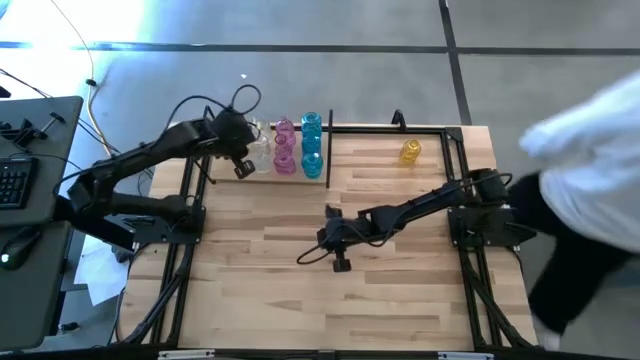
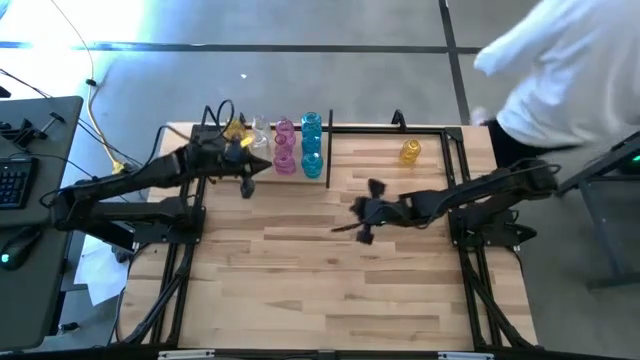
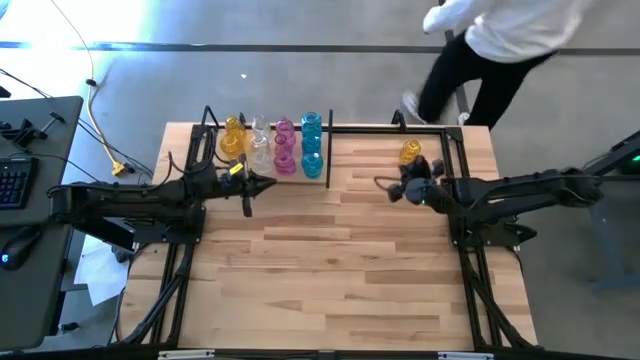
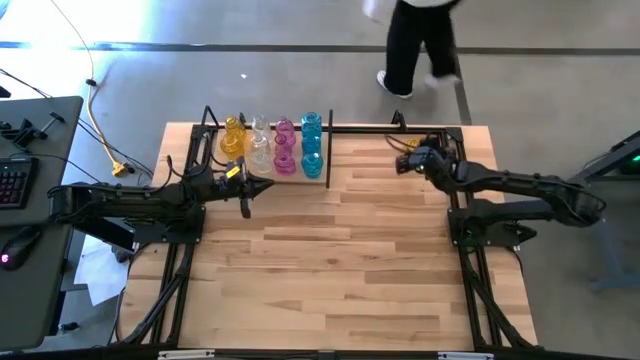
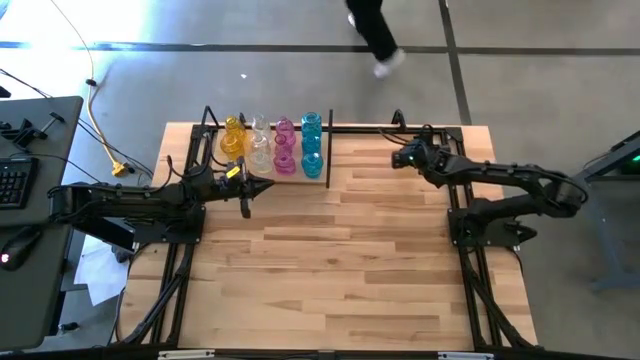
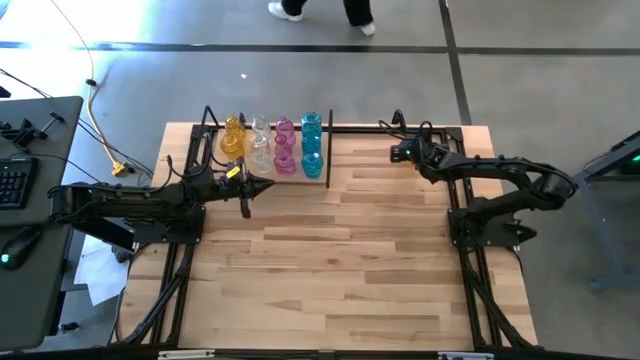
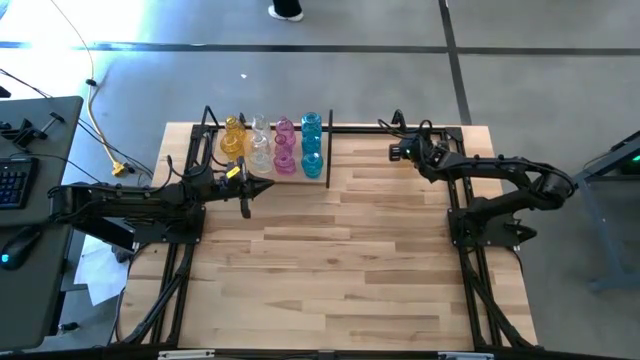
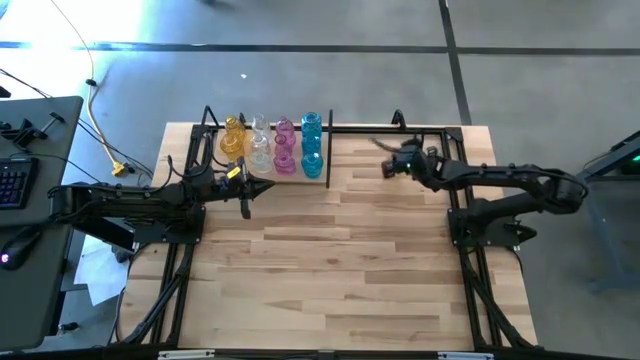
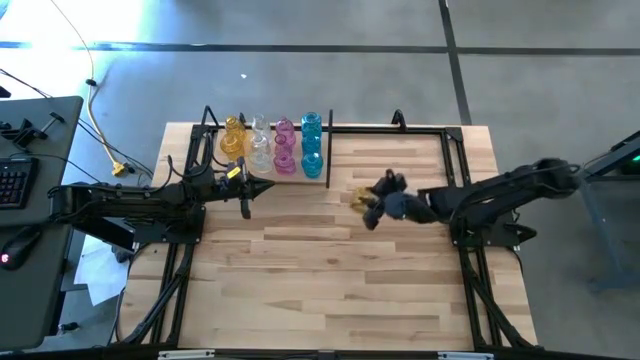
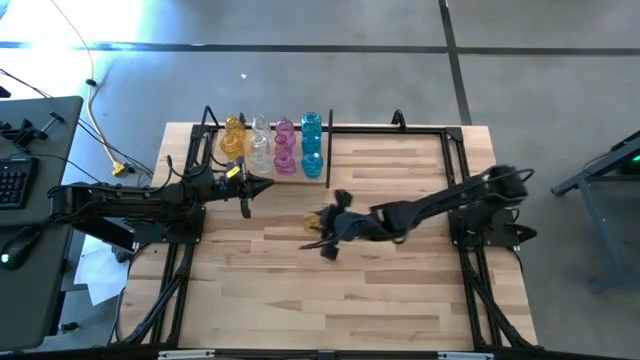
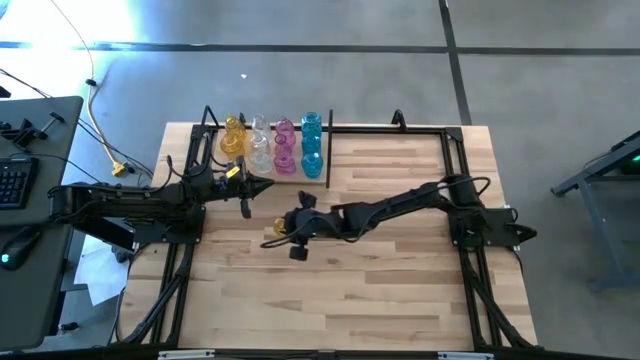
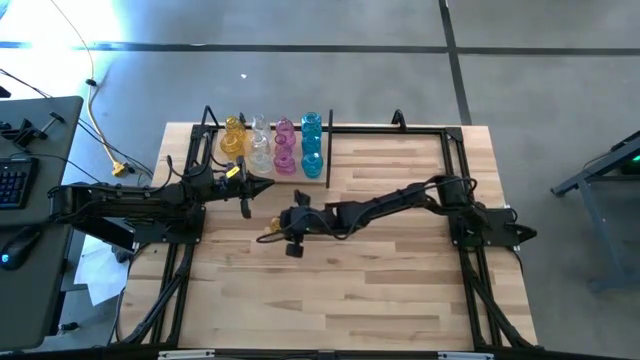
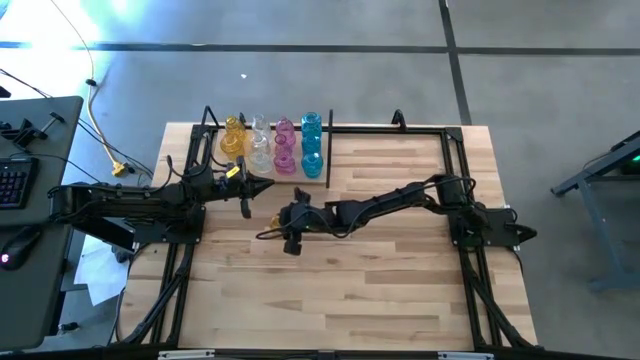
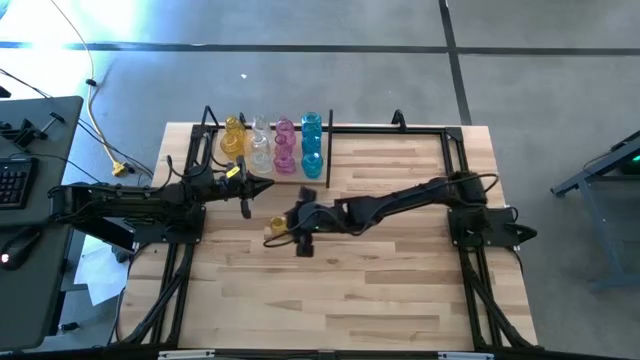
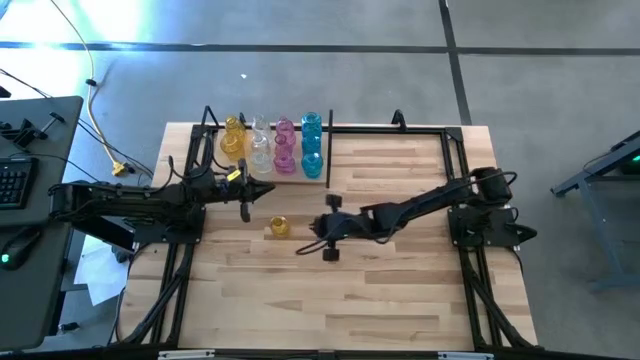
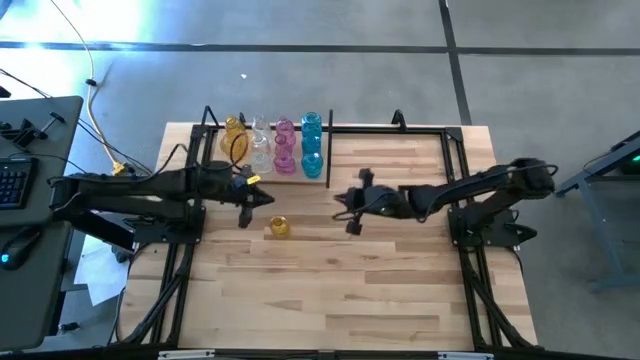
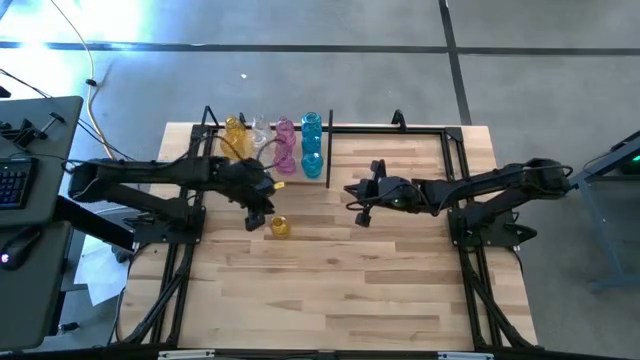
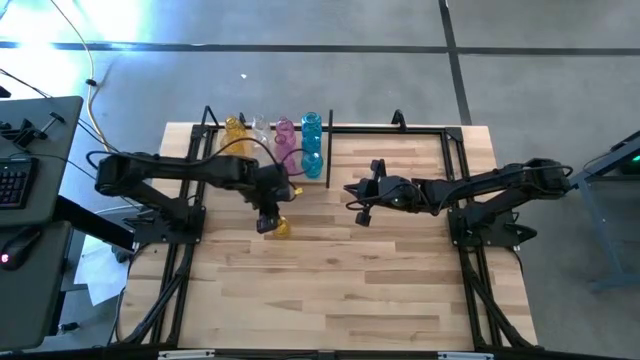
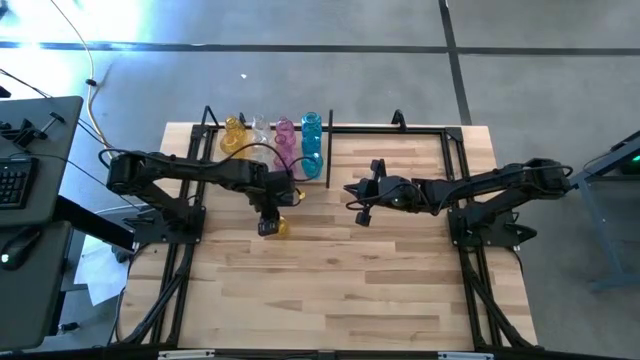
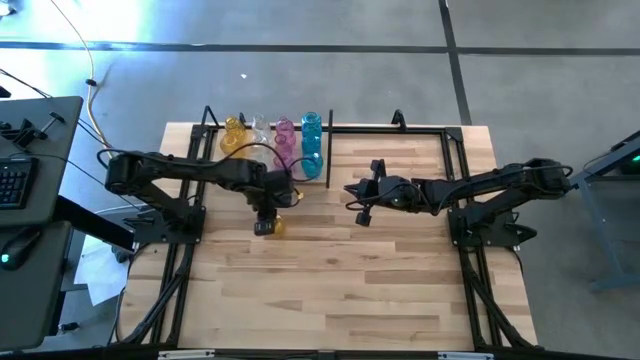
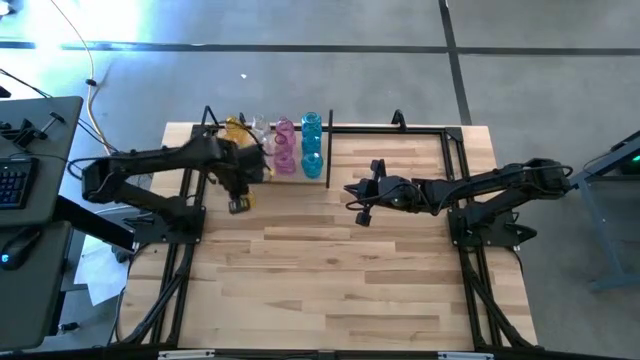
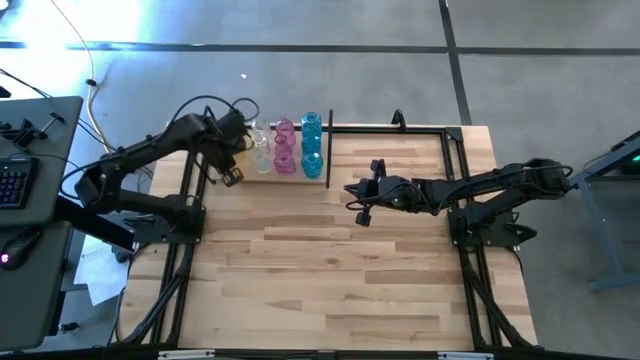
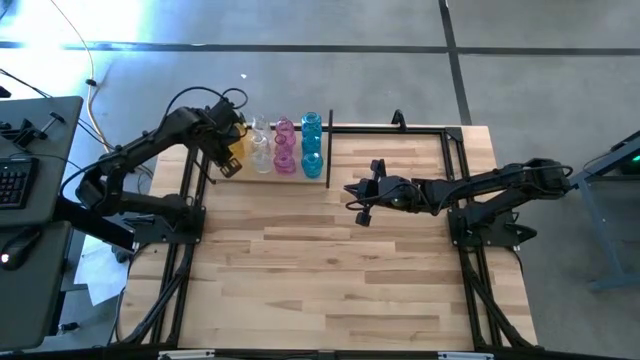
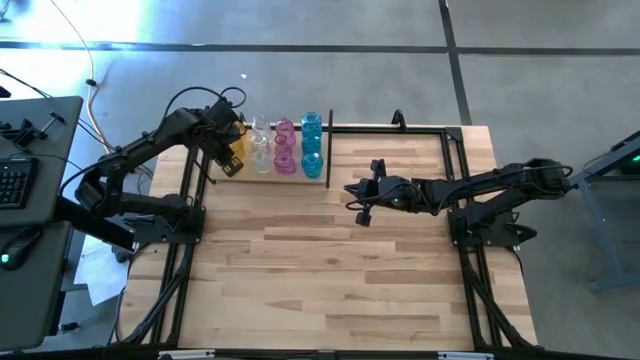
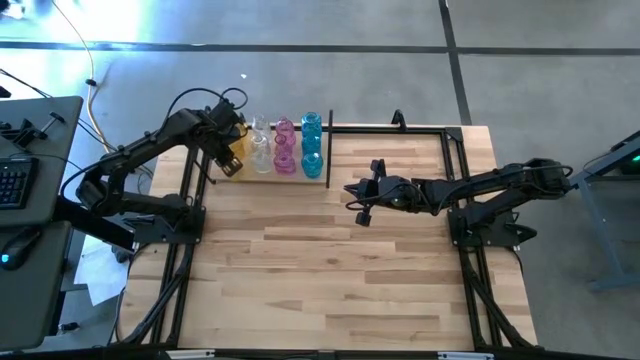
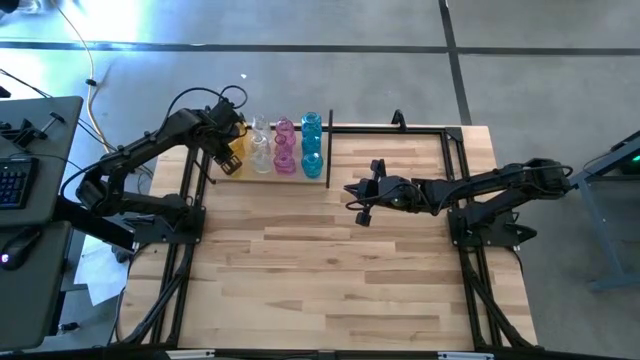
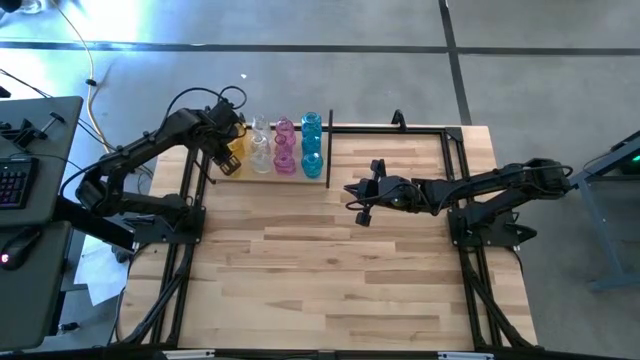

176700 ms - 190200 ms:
Task: sort vases onto shelf
Put the yellow flower vase aligned with the other yellow flower vase on the shelf

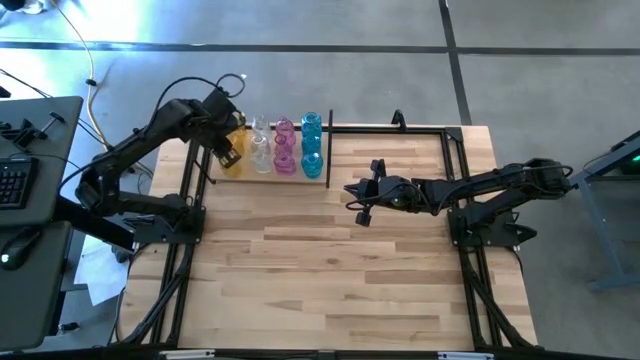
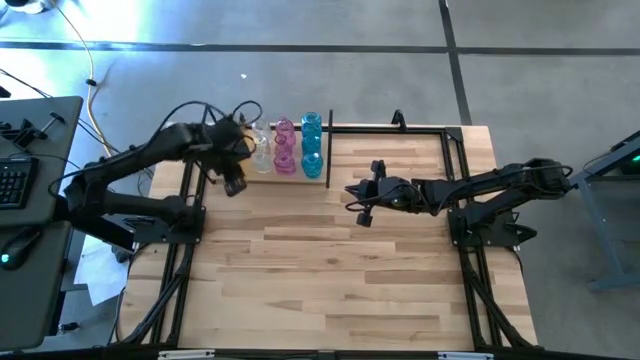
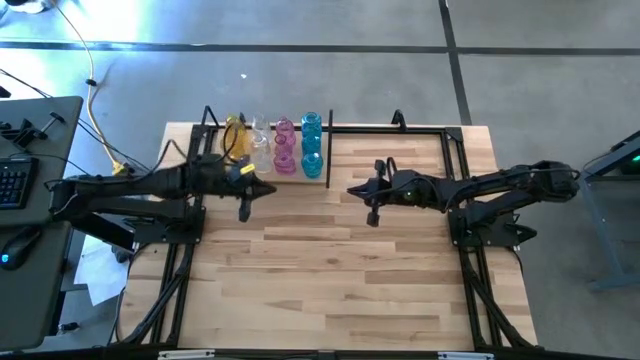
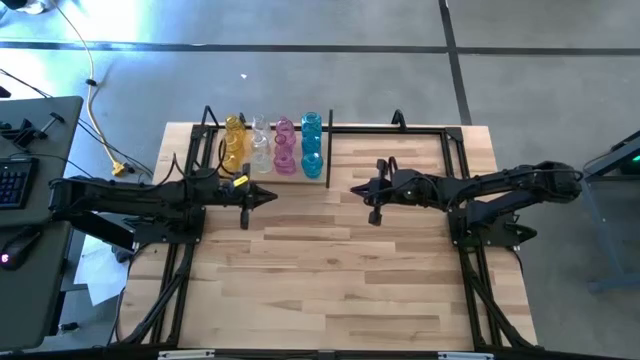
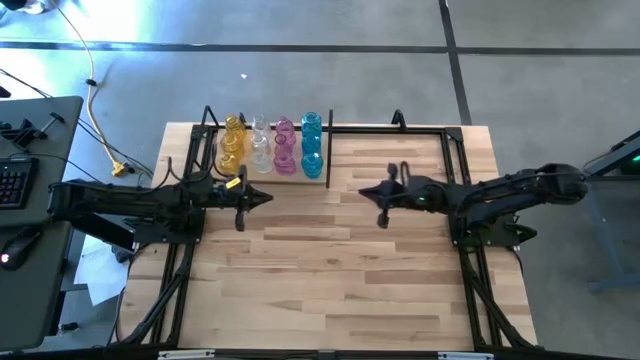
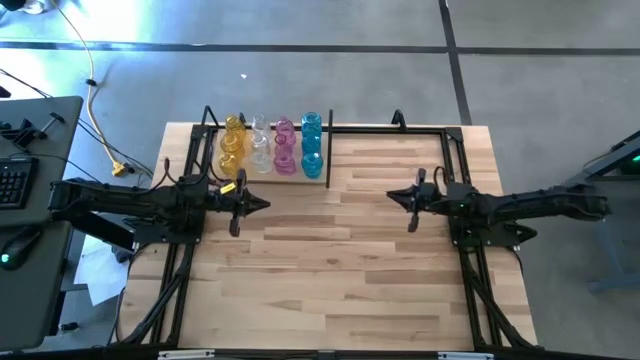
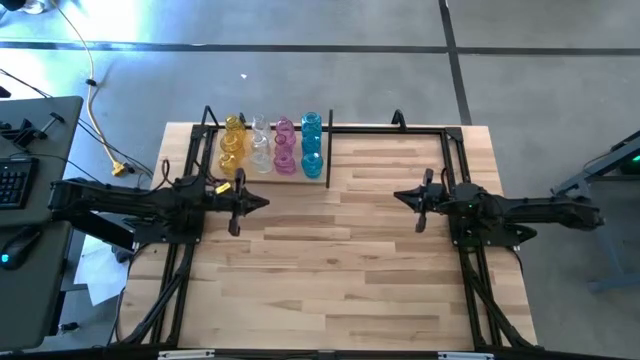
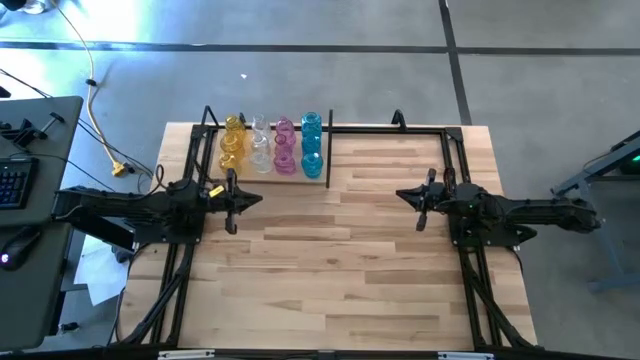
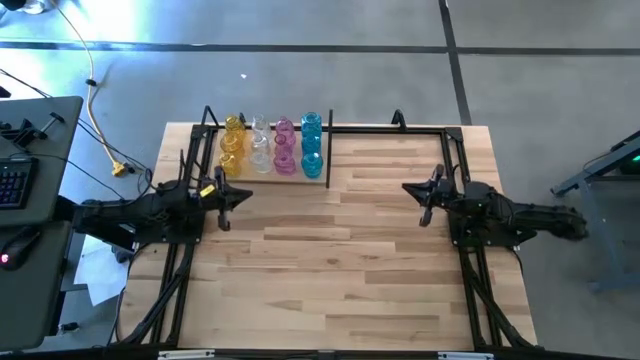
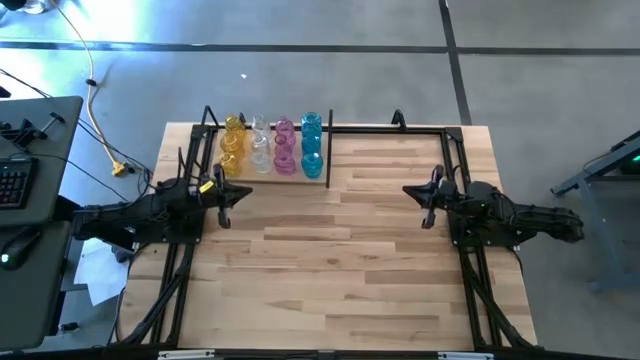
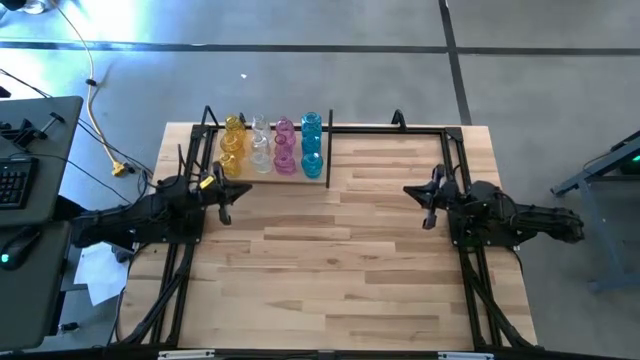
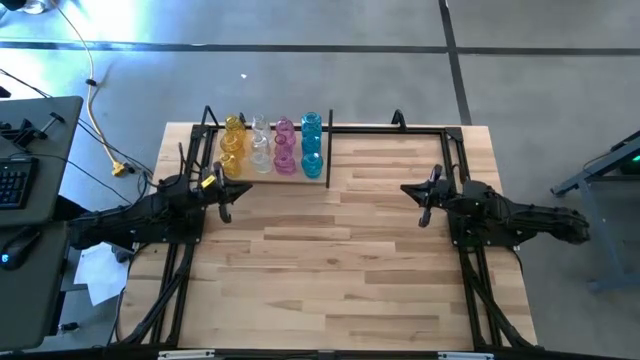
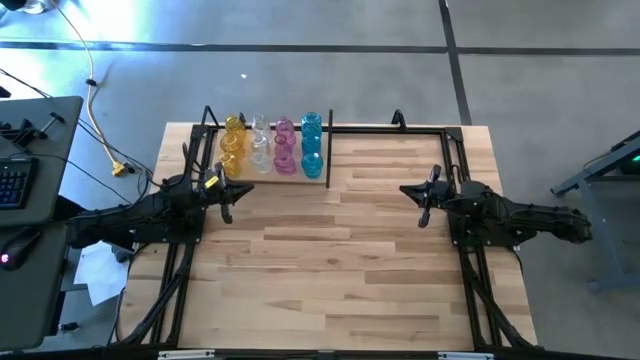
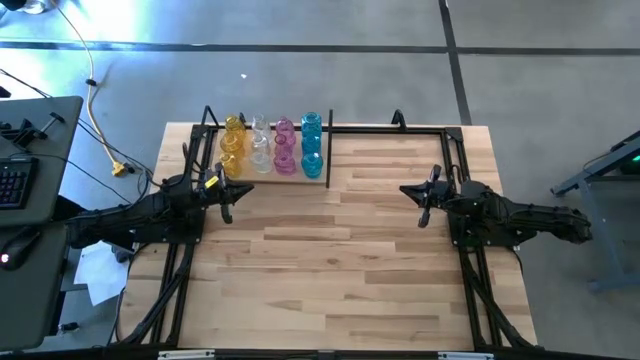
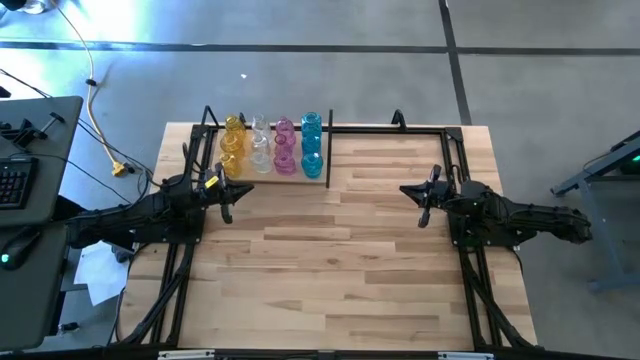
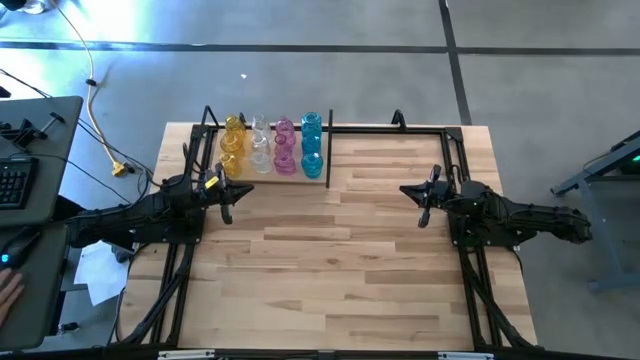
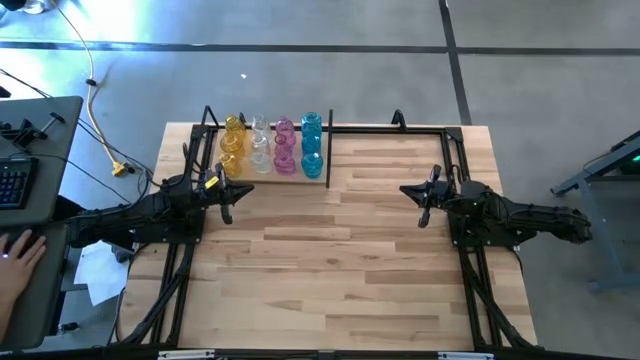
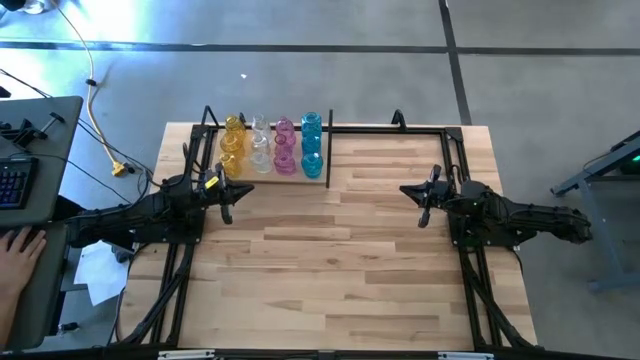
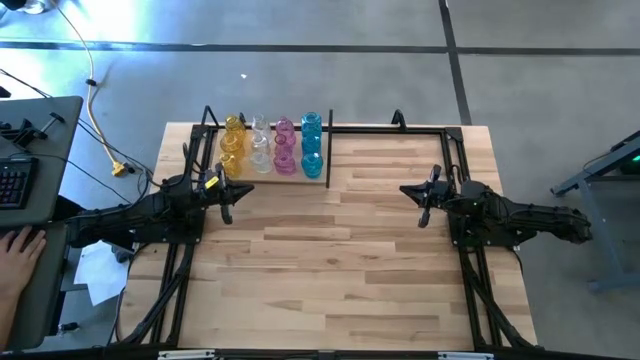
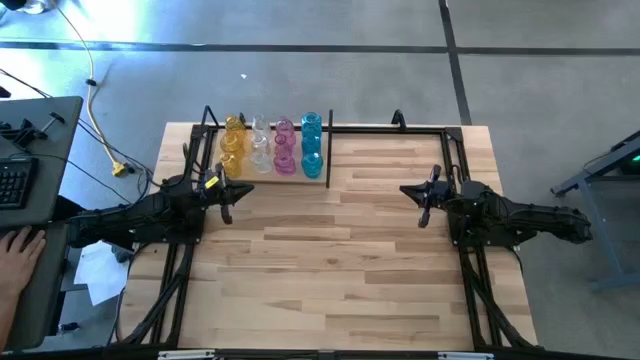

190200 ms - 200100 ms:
Return to Home Position
